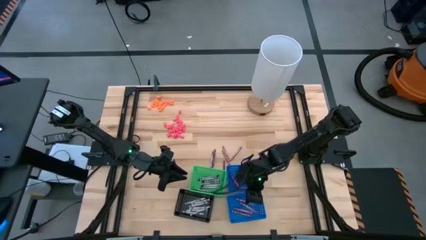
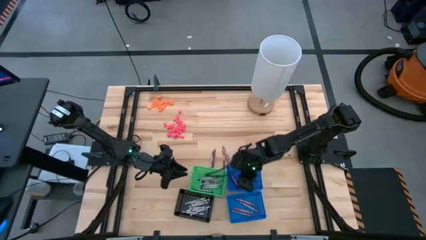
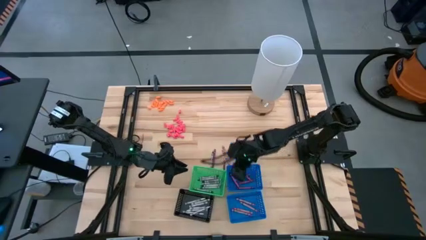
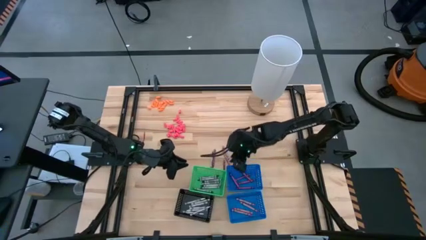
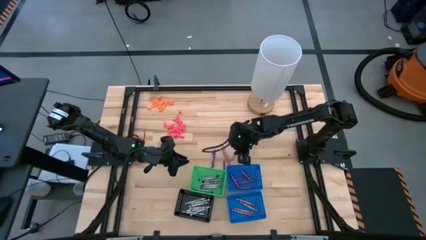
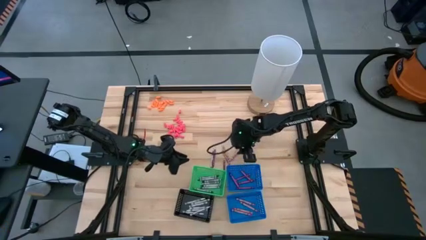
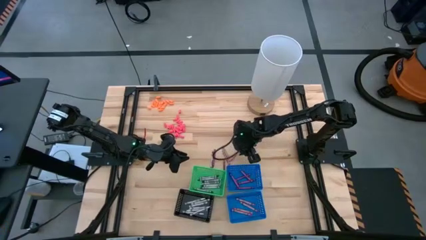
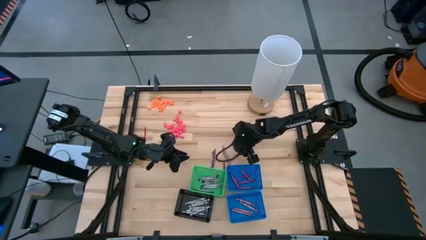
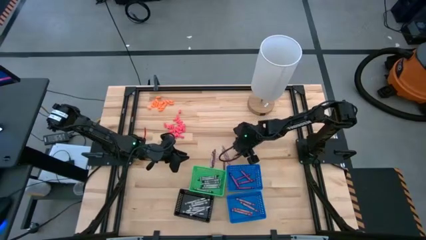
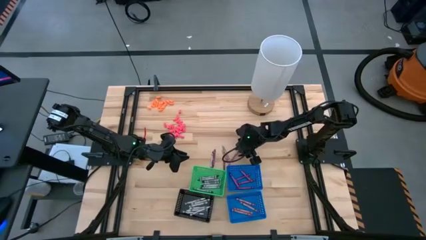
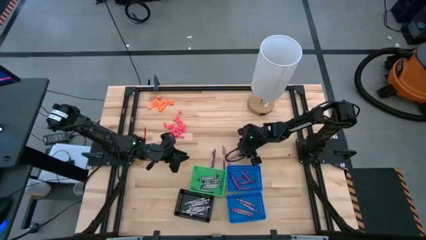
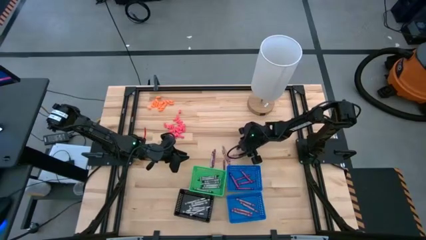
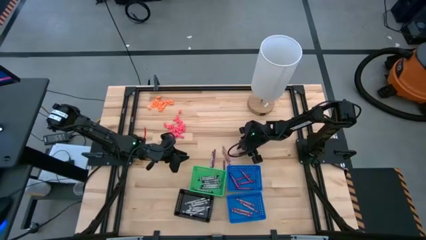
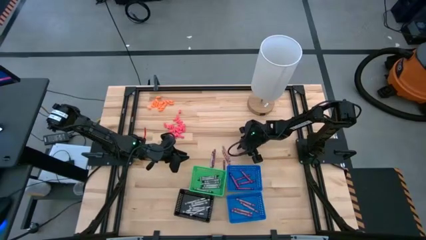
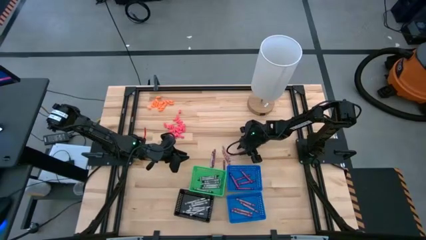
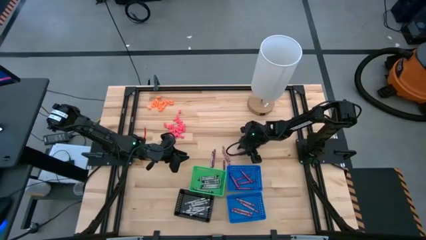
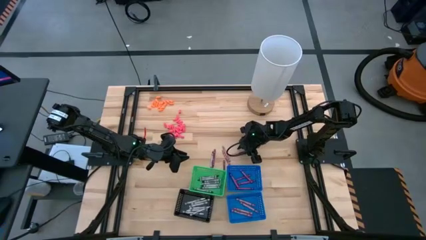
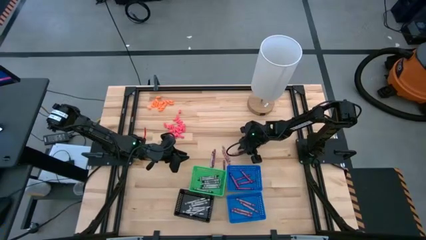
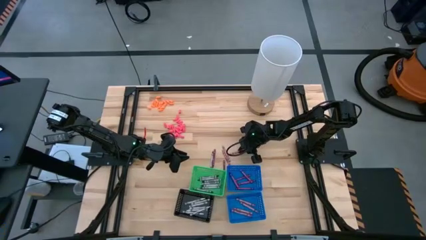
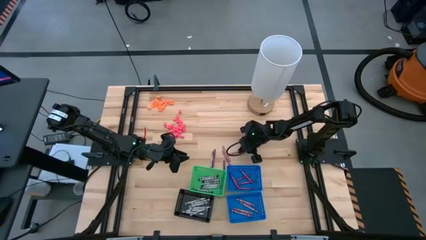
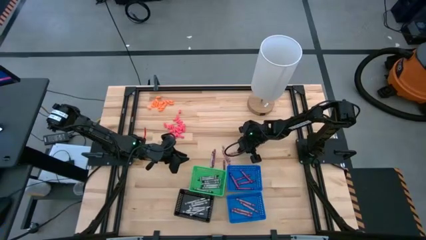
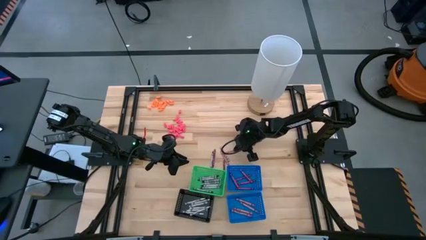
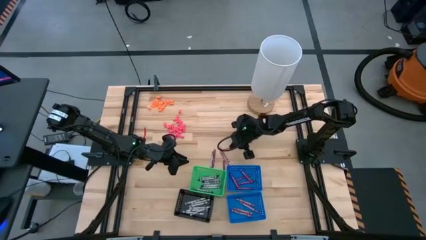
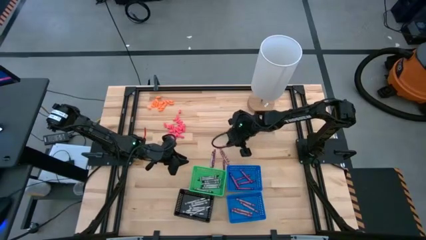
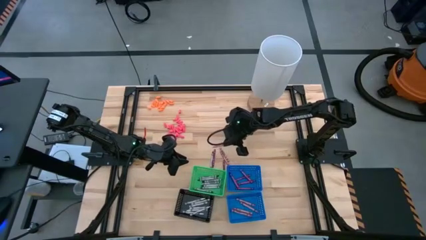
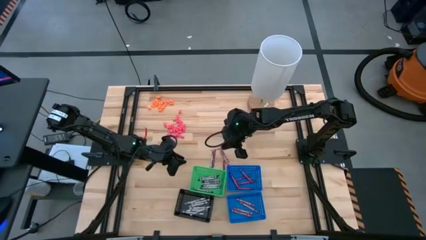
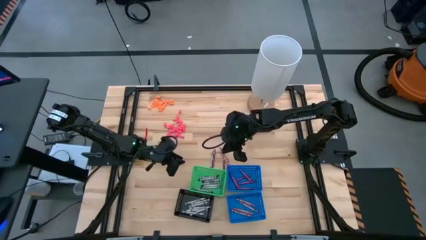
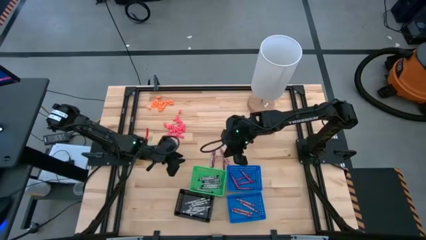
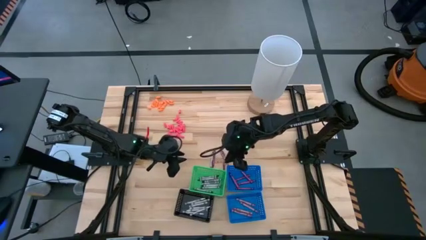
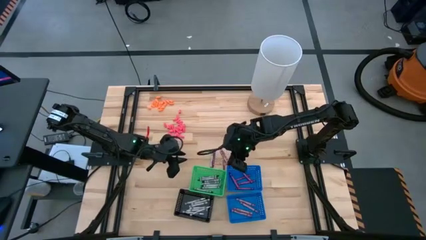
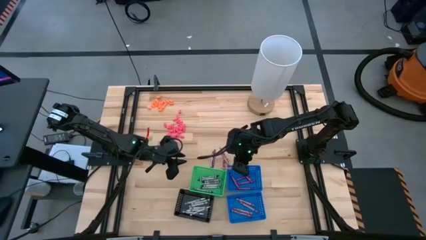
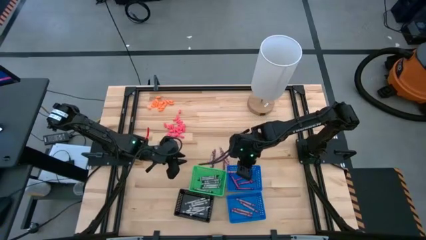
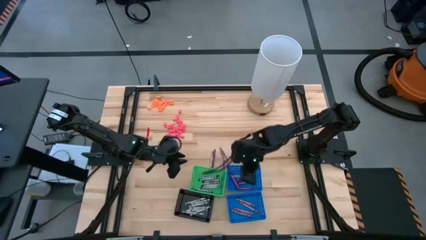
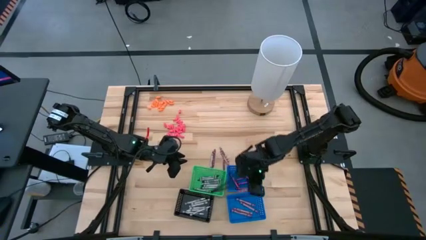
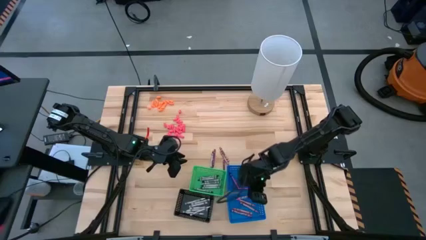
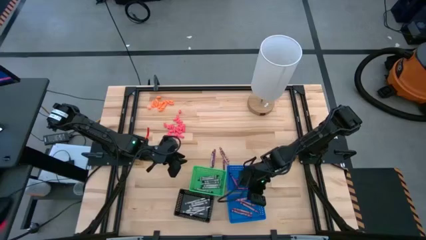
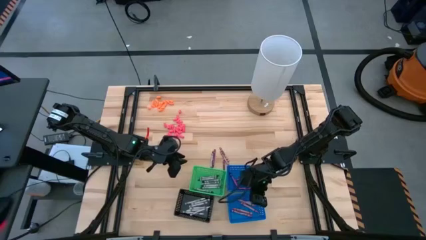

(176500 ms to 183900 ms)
Task: Sort crayons
Put the pink crayon into the bottom blue bin

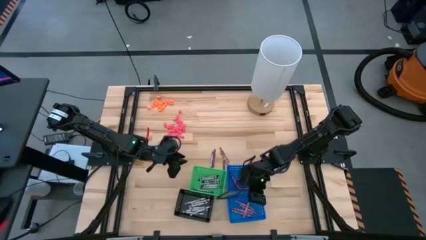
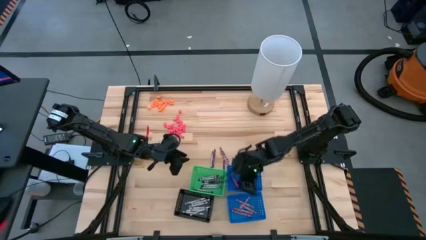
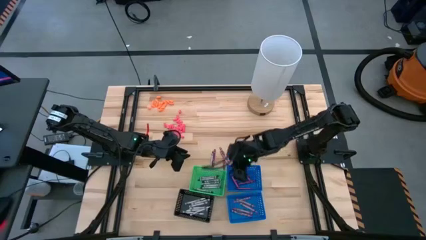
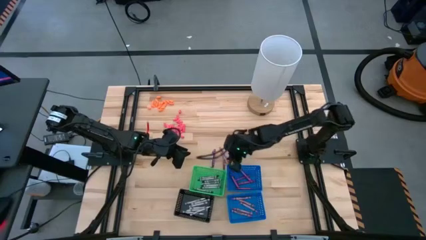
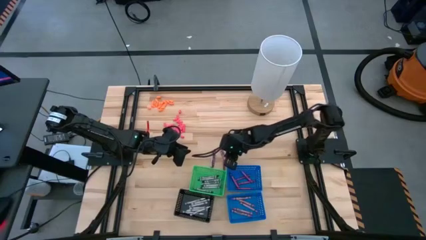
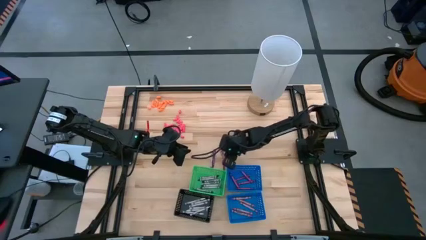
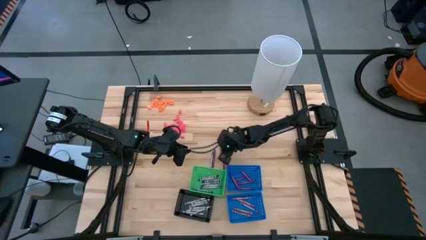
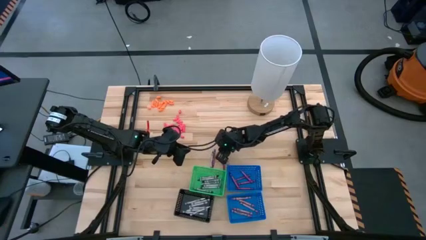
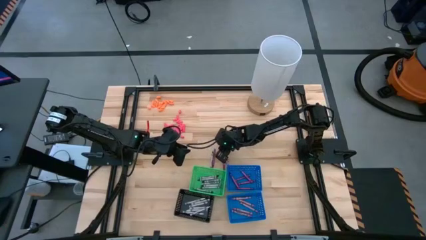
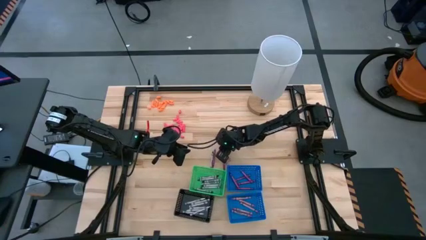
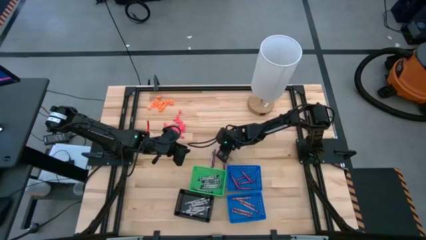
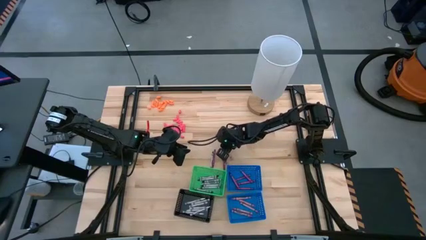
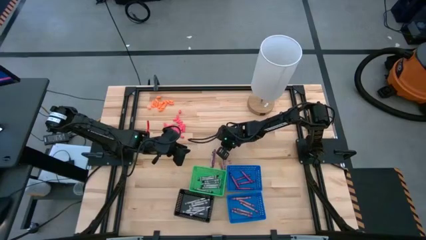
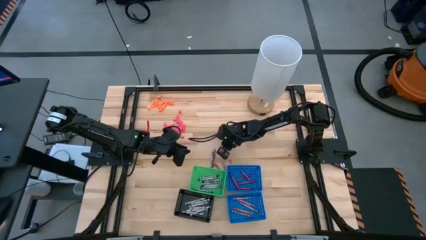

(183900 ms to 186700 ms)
Put the pink crayon into the bottom blue bin

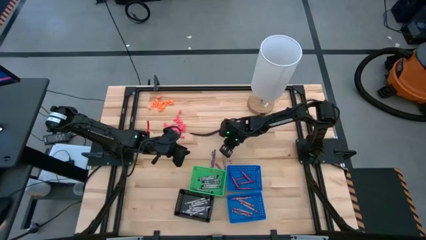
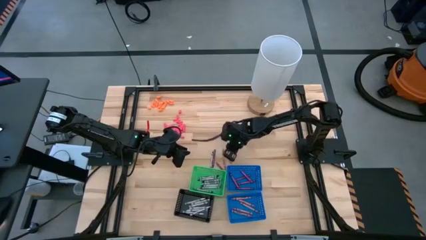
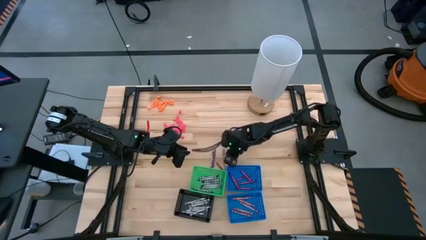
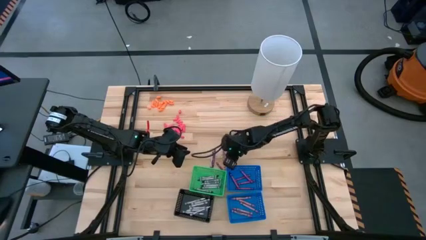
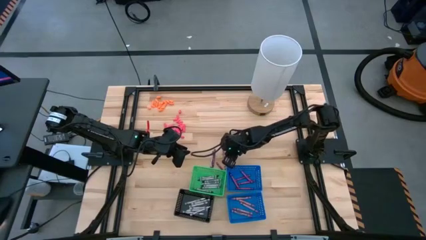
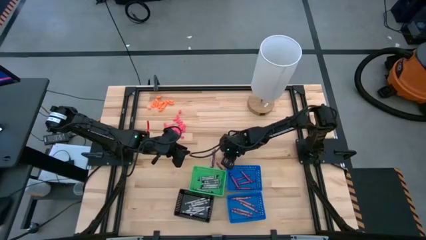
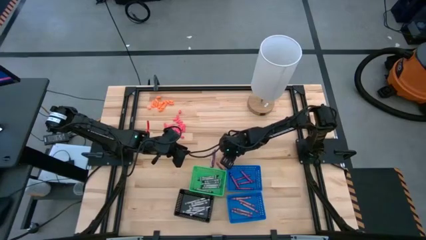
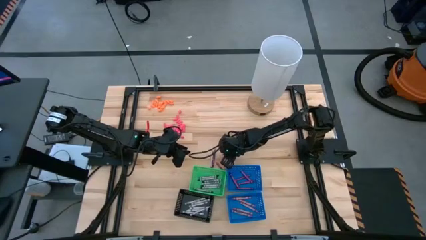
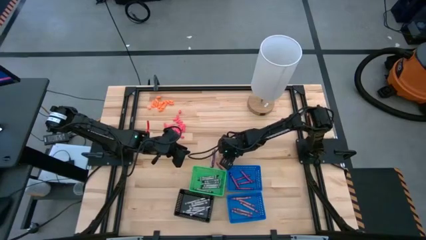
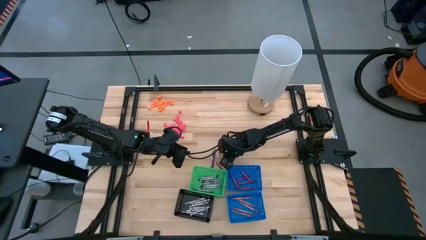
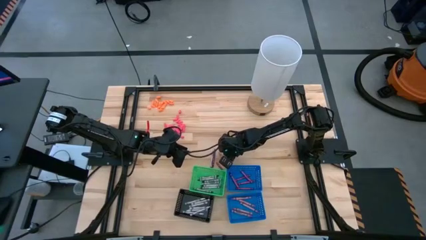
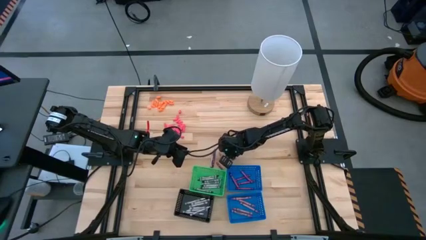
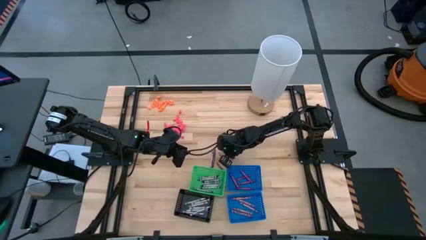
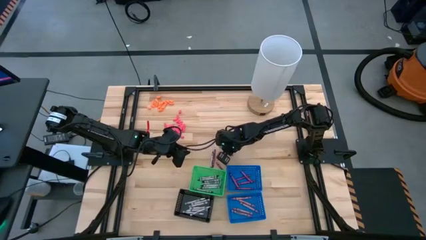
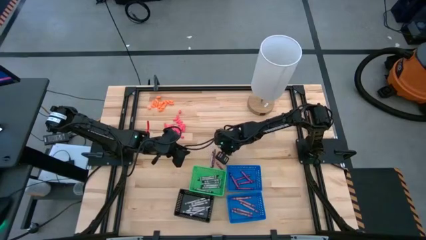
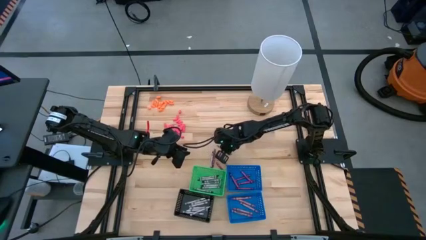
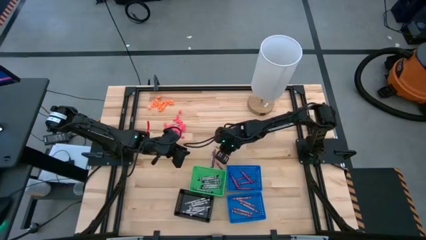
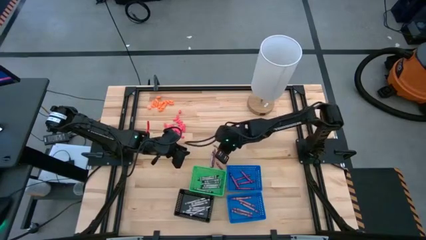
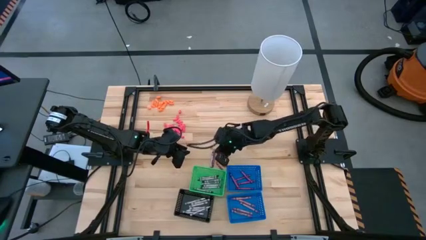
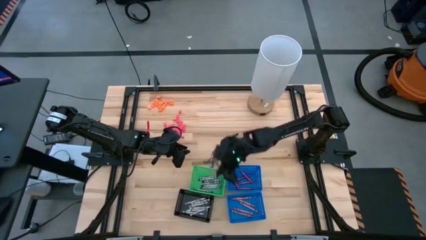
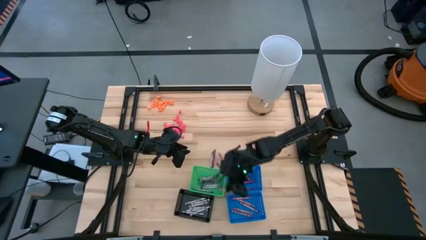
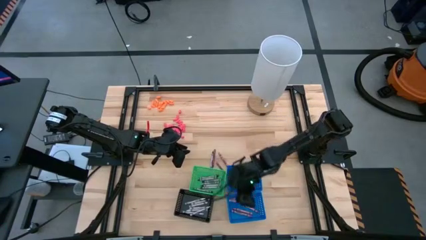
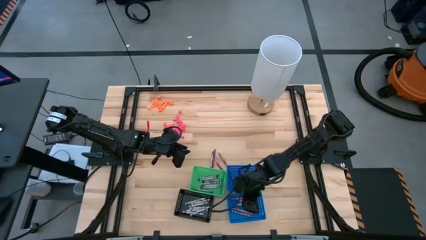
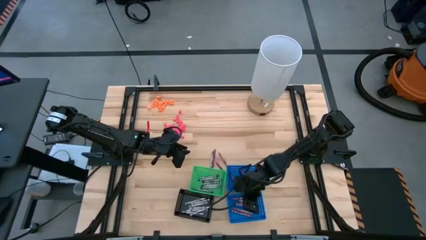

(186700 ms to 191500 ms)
Put the pink crayon into the bottom blue bin

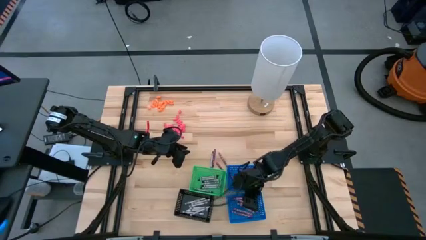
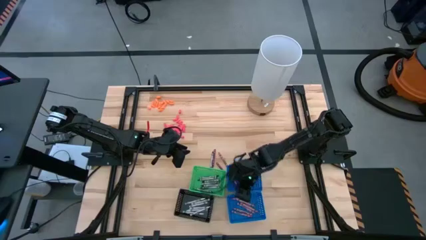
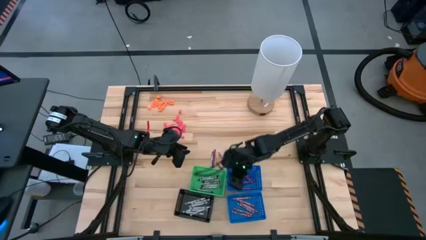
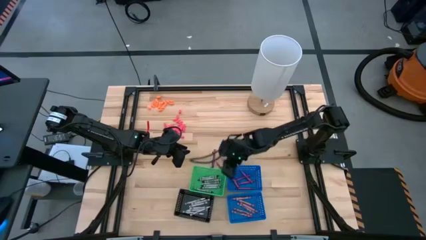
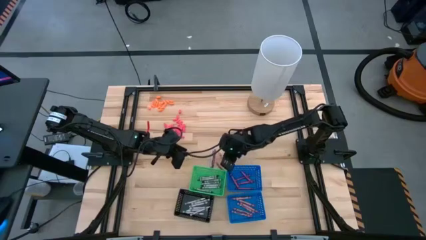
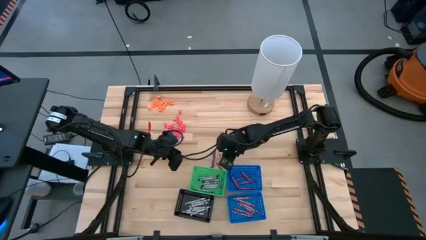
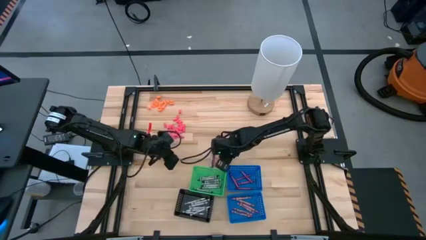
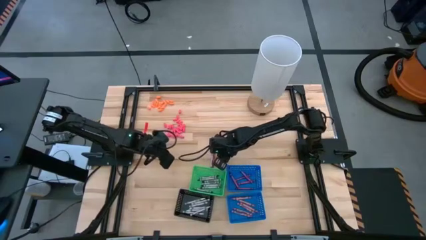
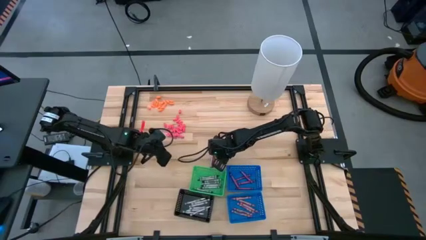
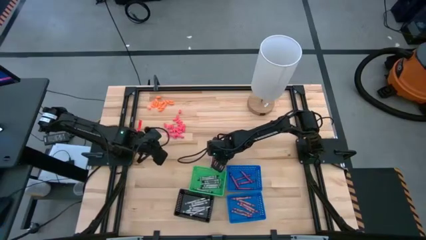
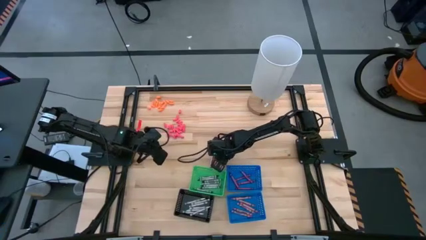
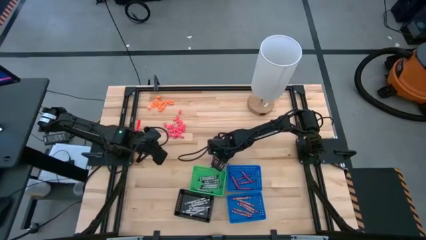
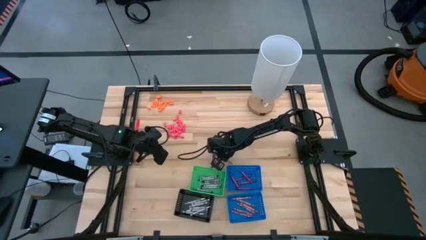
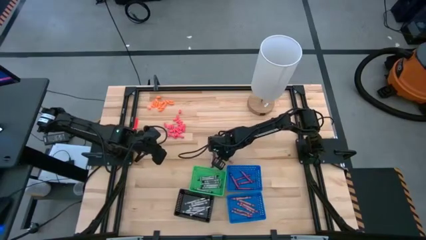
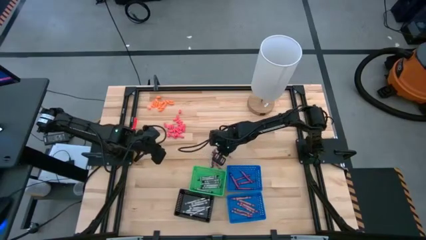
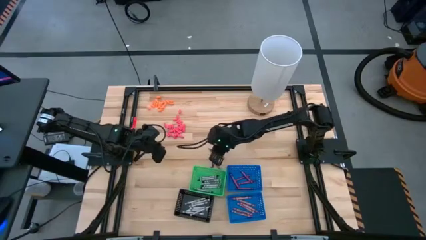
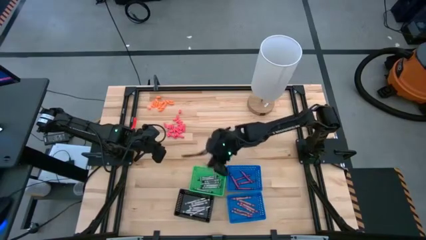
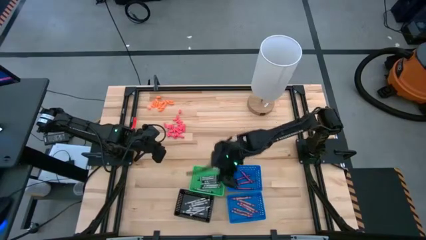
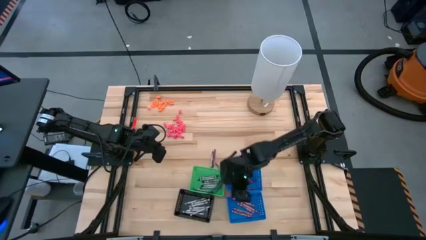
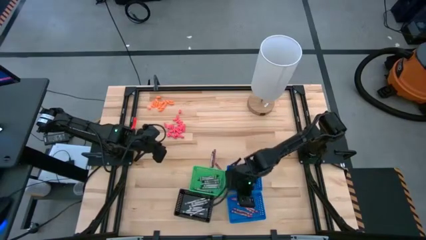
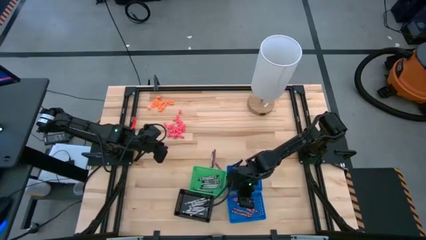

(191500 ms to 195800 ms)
Put the pink crayon into the bottom blue bin
